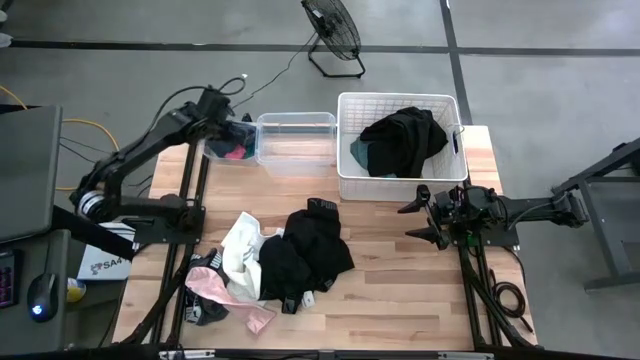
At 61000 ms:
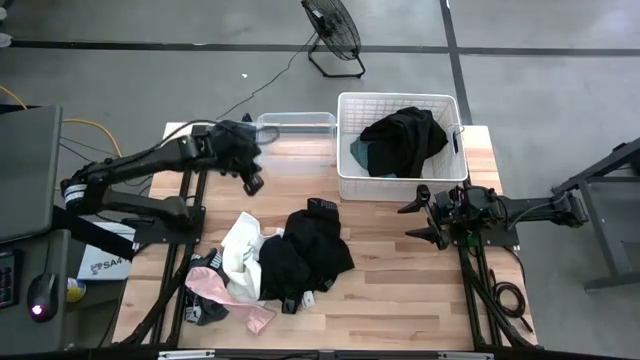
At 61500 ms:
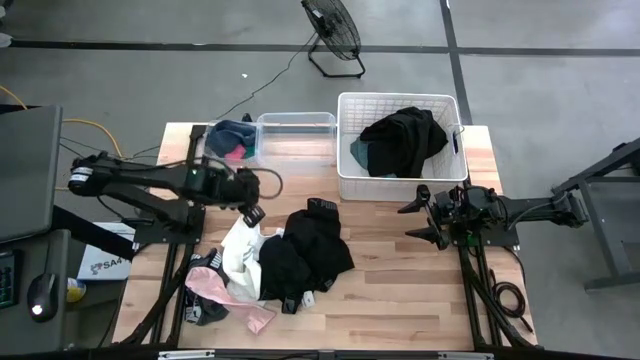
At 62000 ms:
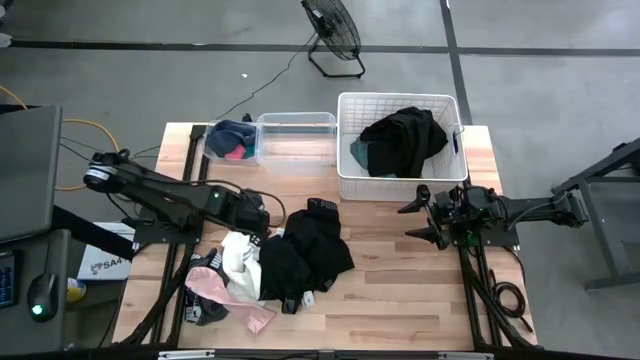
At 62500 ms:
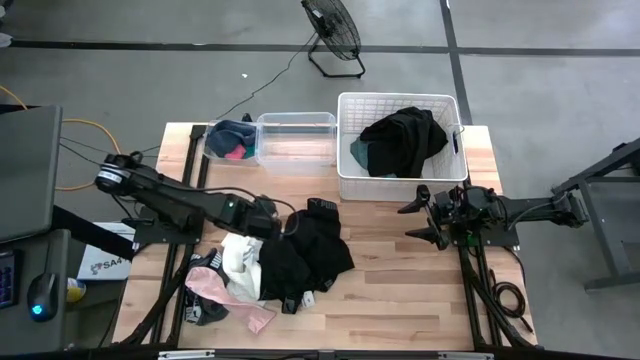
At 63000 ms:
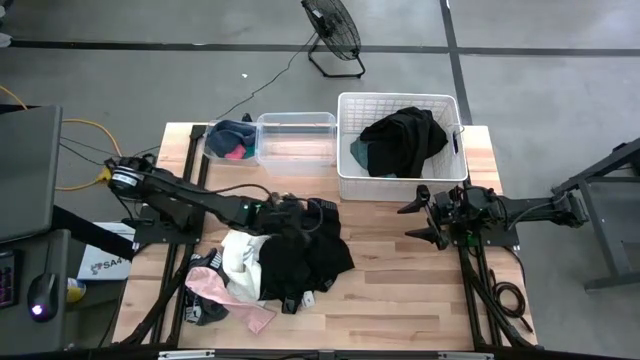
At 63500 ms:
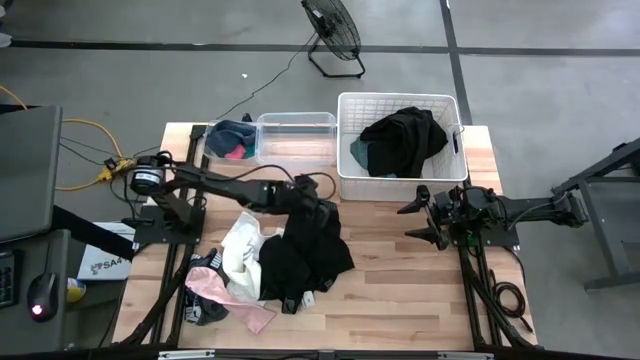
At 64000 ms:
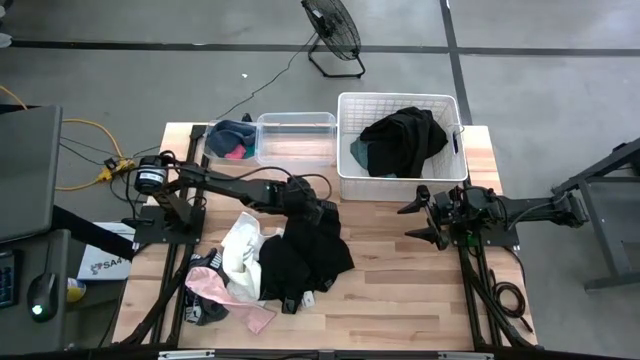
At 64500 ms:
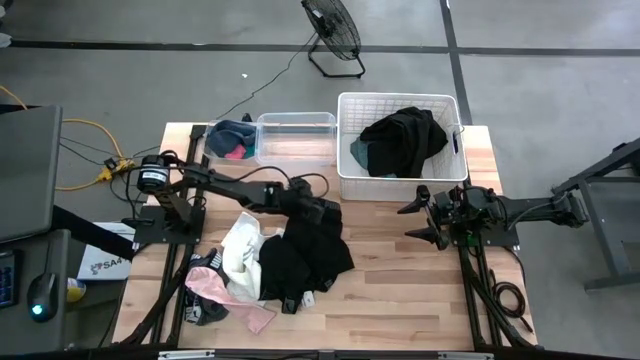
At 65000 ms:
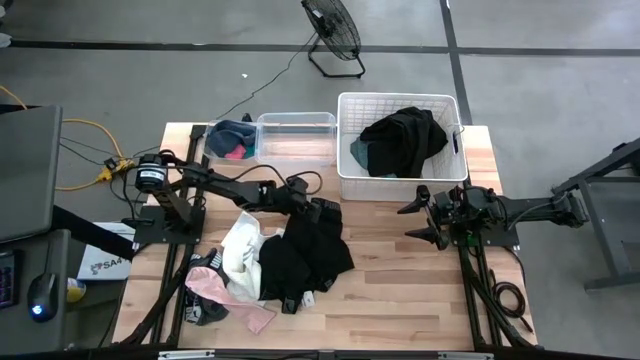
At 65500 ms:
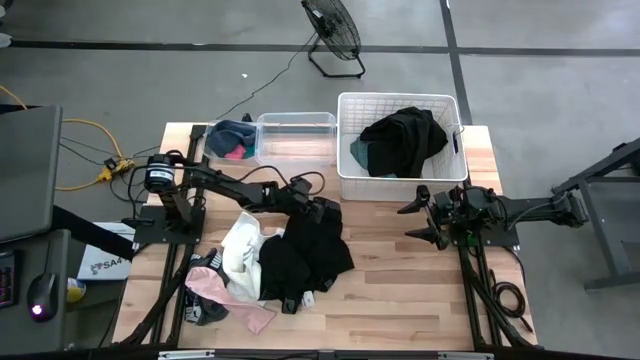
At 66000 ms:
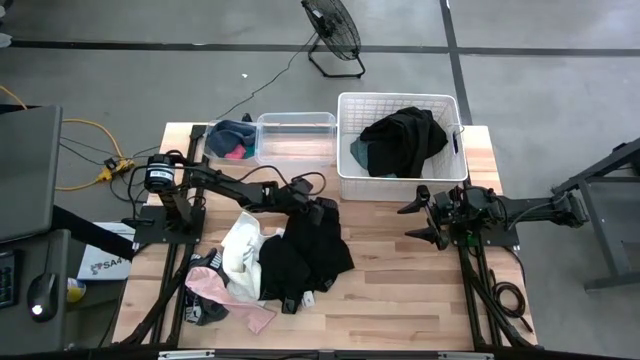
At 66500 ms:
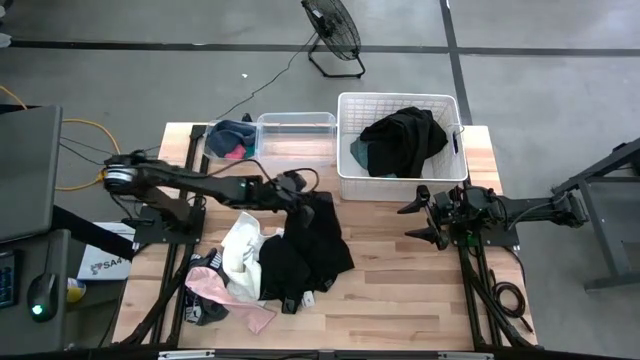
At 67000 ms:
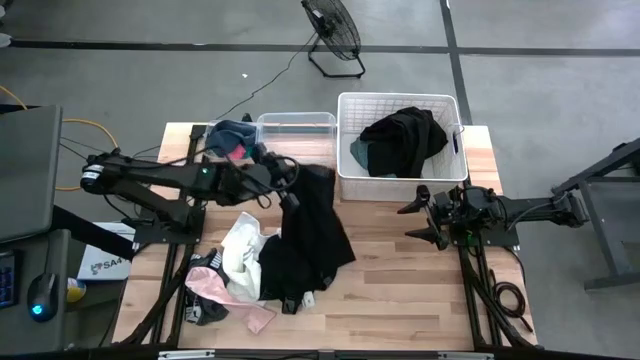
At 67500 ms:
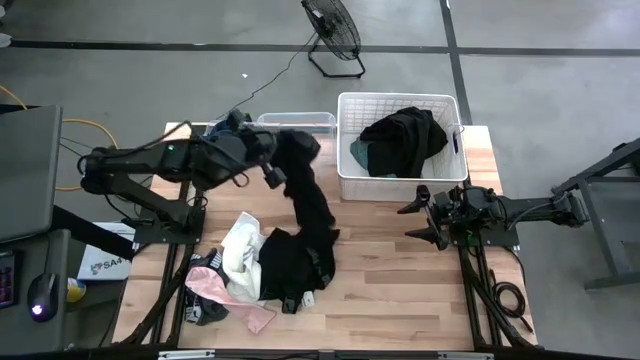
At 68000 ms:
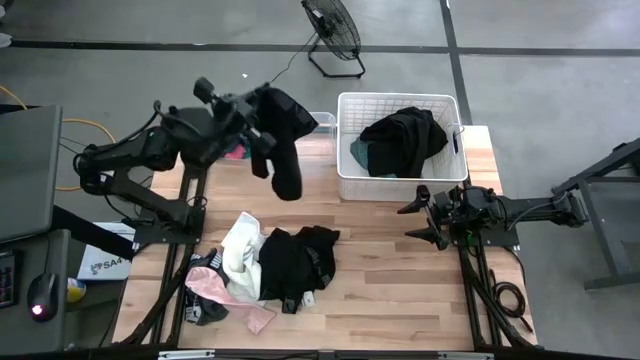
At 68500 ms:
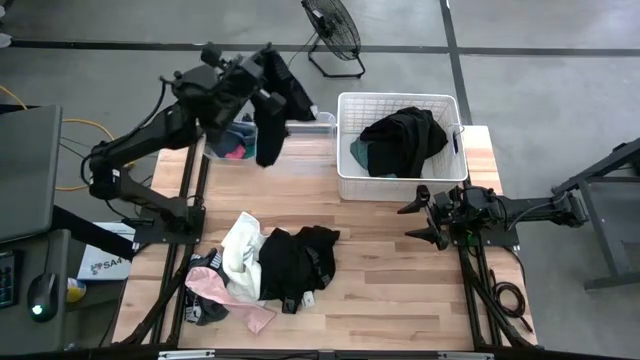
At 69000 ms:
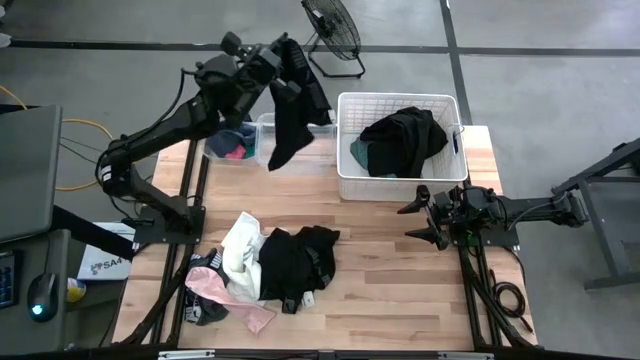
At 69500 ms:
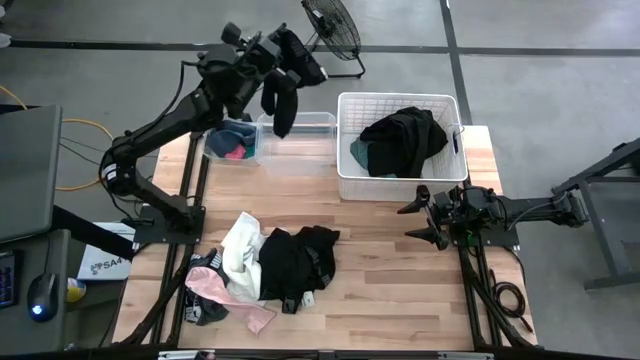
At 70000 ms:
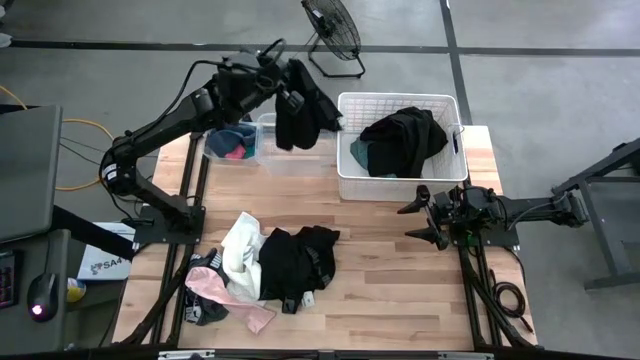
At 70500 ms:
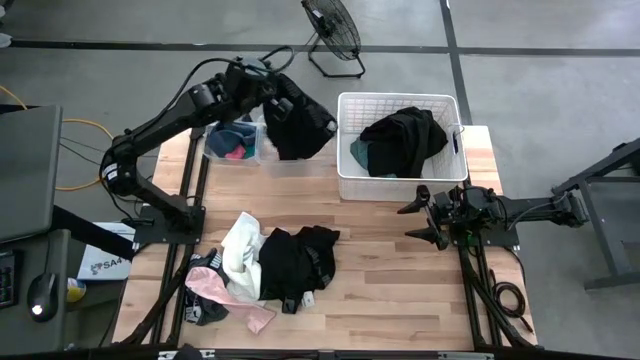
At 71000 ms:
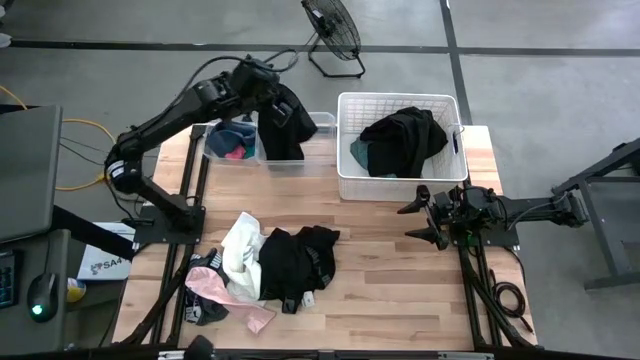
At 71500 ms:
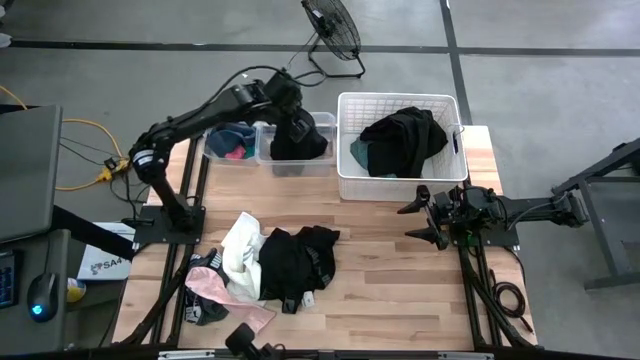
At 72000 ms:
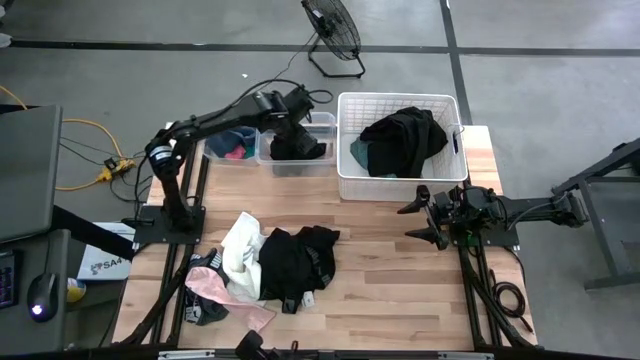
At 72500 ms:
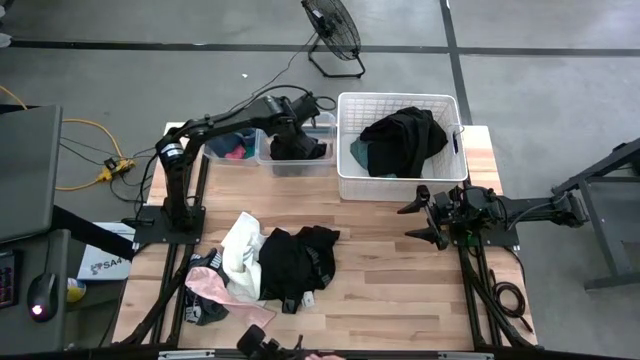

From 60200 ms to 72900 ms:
Task: Pick & Place Cloths
Put the top black boxer into the right transparent bin

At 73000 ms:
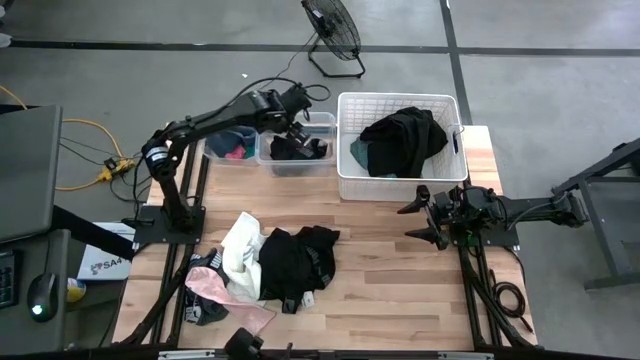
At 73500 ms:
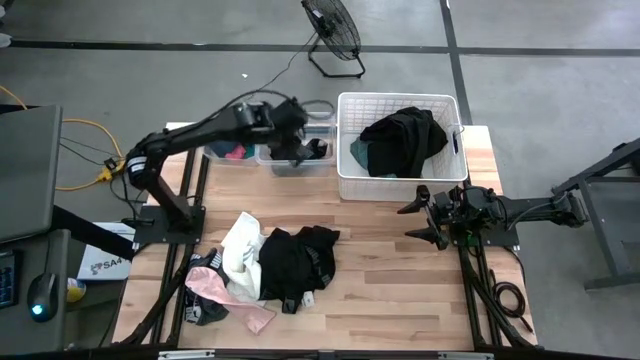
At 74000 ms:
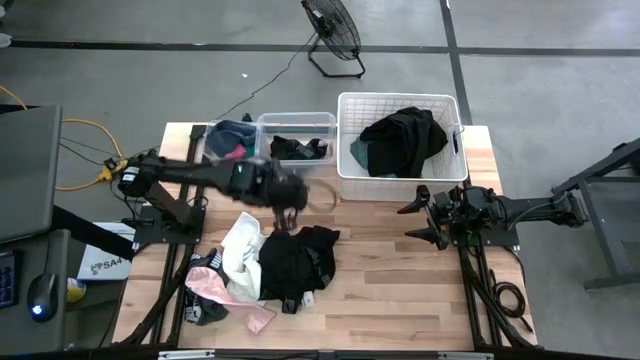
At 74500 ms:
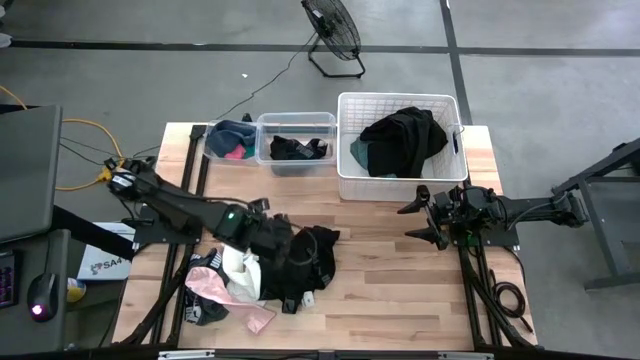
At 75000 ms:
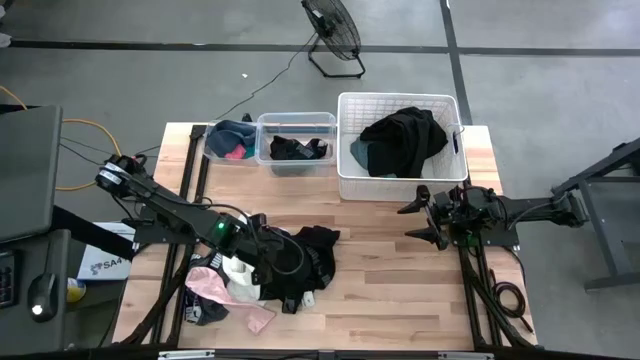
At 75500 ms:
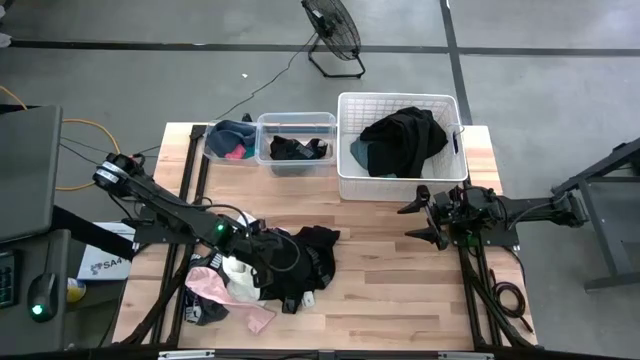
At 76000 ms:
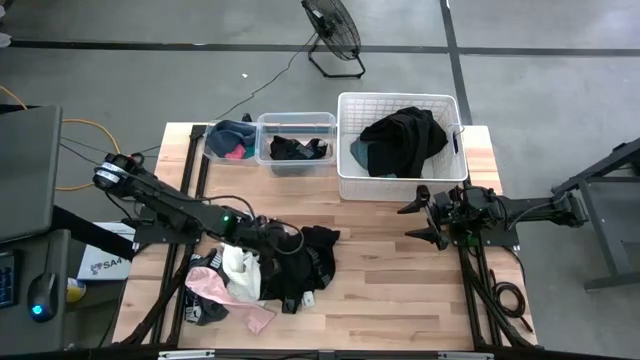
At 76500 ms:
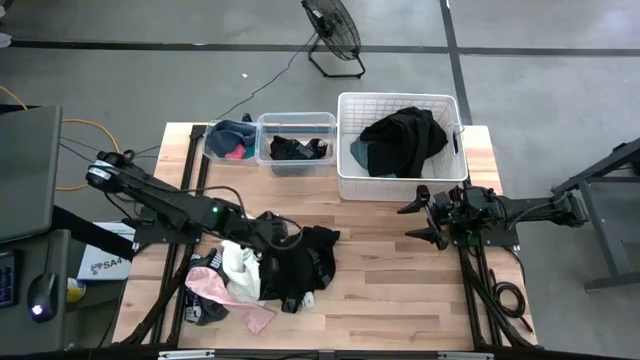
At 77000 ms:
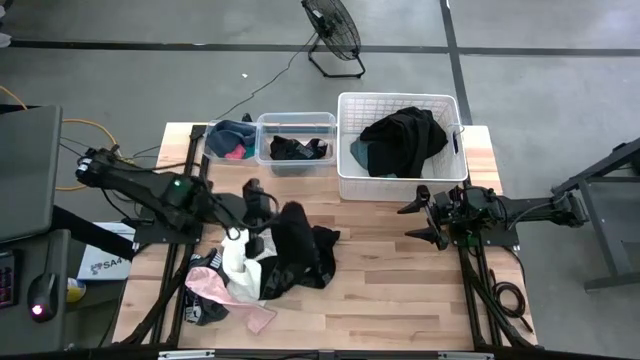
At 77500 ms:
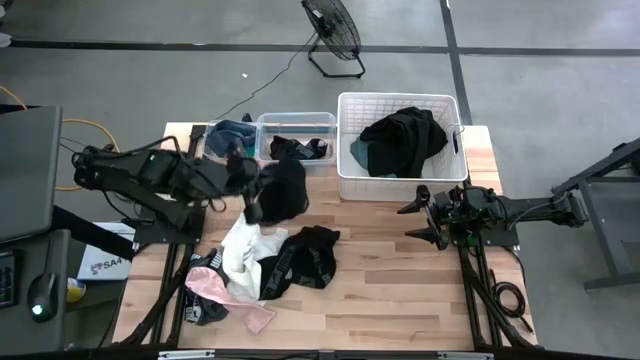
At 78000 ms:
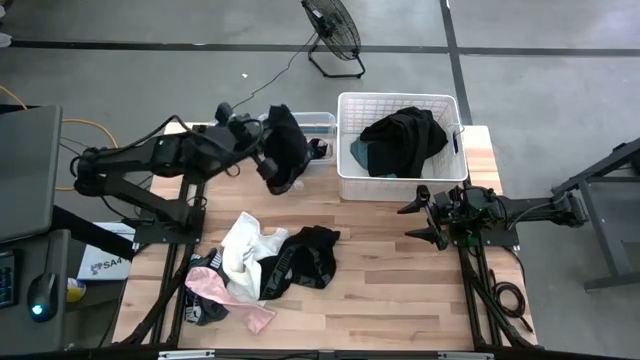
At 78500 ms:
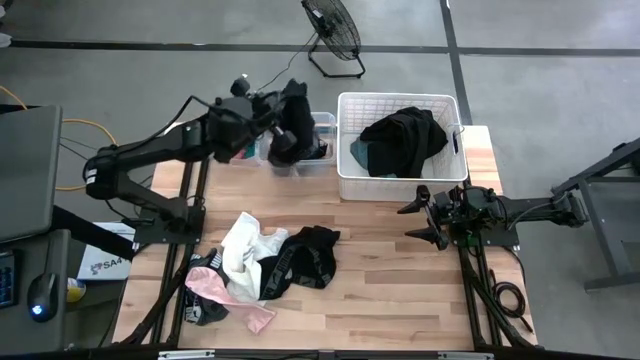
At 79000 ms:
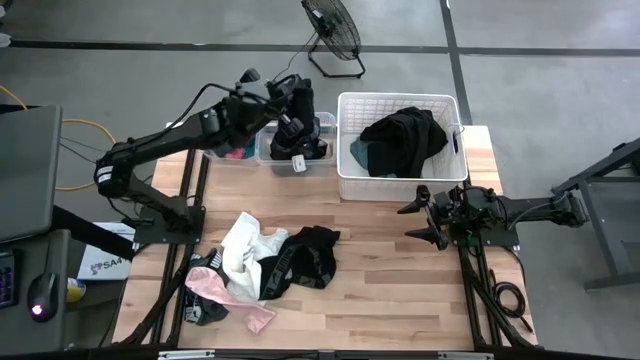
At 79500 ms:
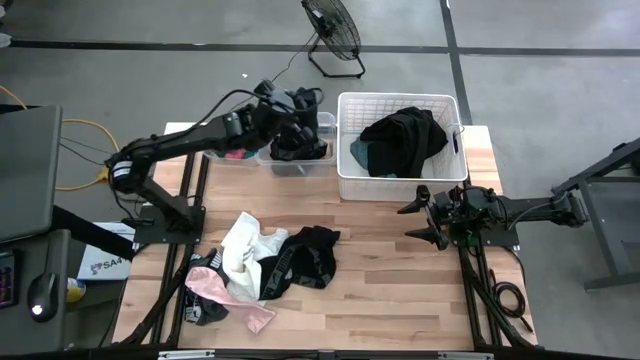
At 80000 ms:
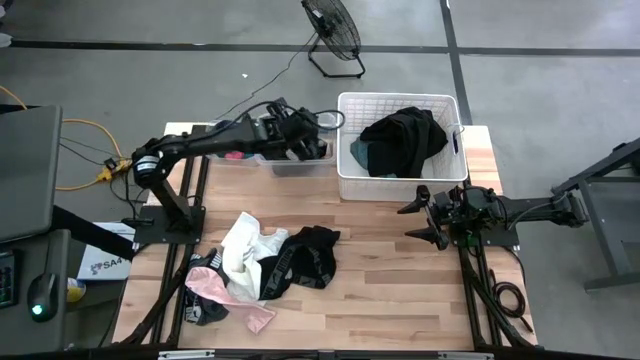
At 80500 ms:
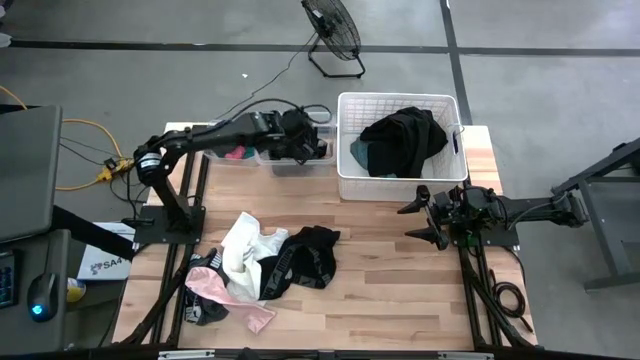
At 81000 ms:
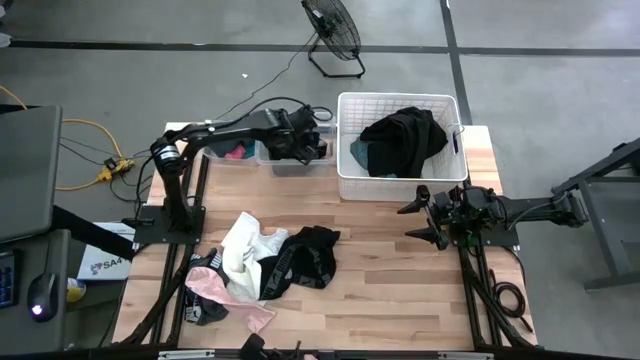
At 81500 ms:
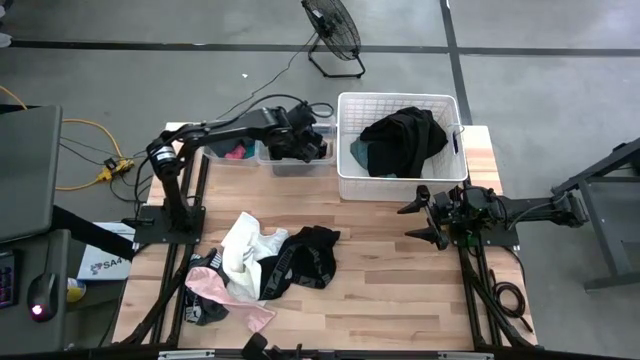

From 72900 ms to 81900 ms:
Put the bottom black boxer into the right transparent bin
